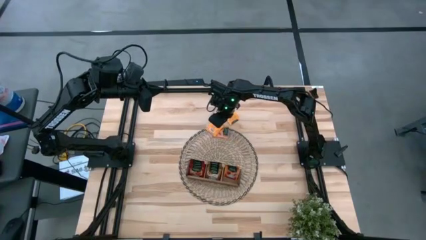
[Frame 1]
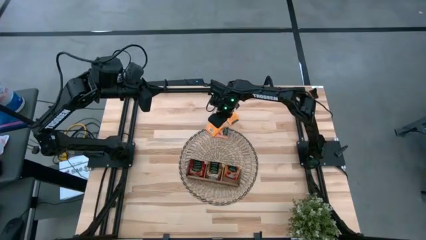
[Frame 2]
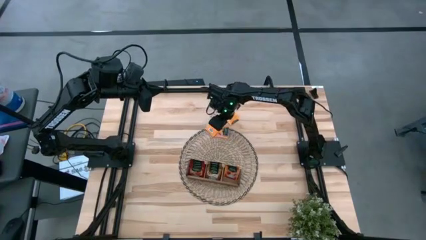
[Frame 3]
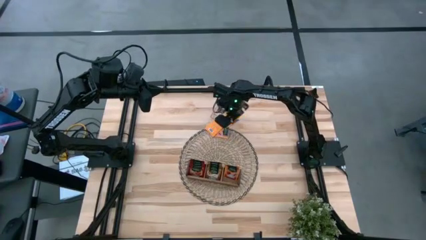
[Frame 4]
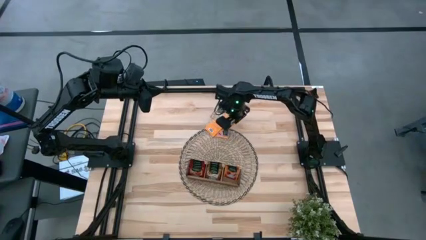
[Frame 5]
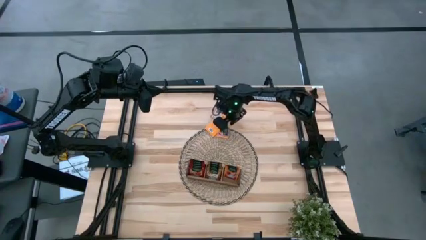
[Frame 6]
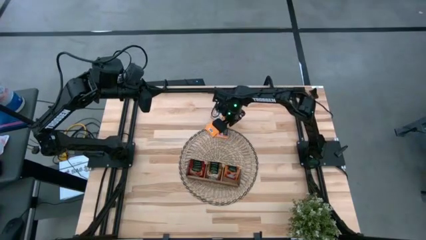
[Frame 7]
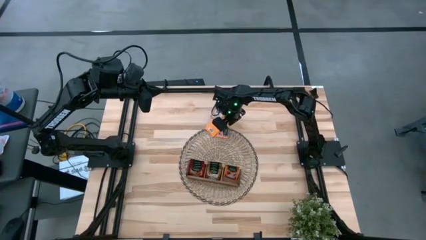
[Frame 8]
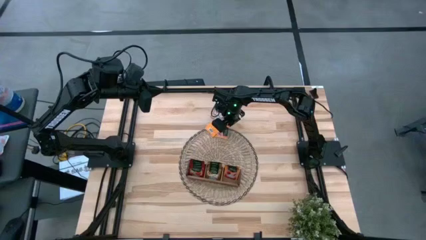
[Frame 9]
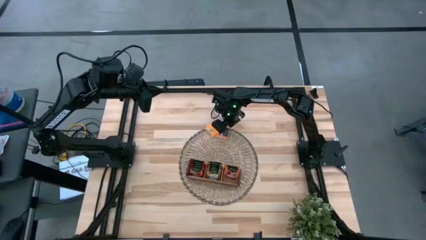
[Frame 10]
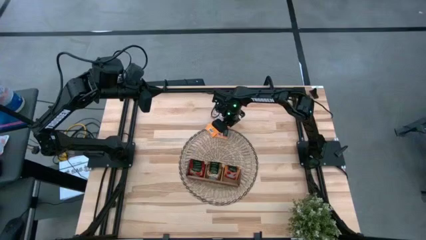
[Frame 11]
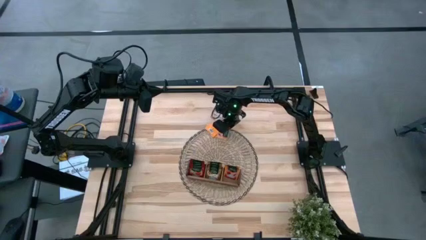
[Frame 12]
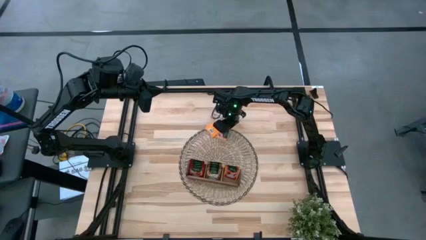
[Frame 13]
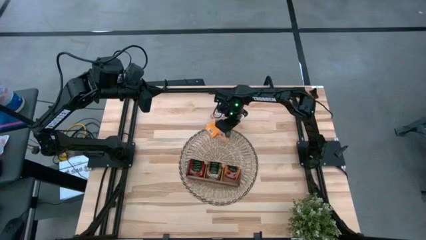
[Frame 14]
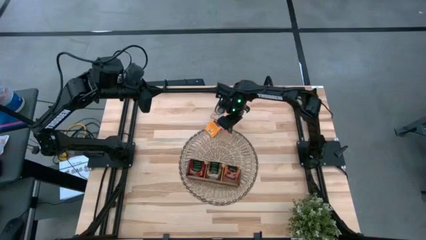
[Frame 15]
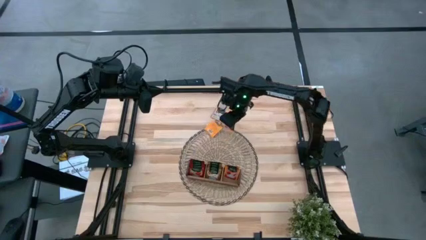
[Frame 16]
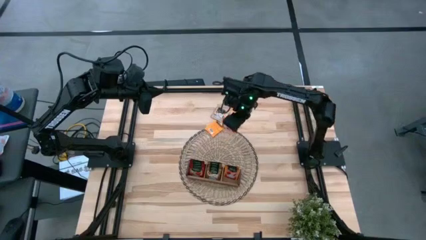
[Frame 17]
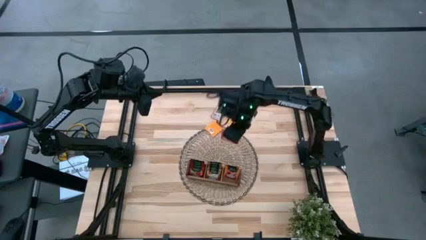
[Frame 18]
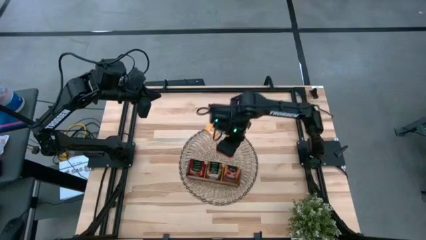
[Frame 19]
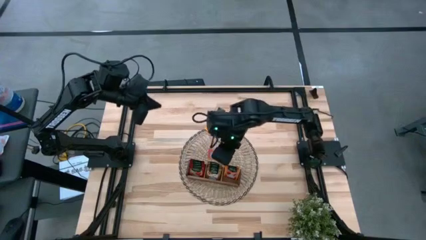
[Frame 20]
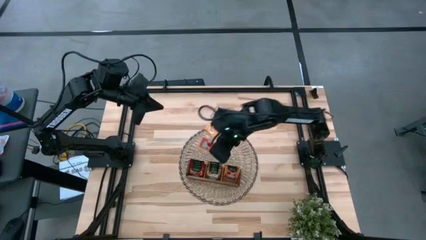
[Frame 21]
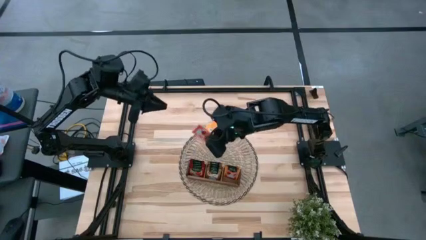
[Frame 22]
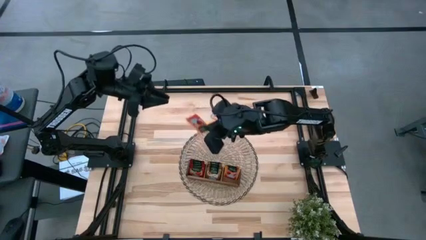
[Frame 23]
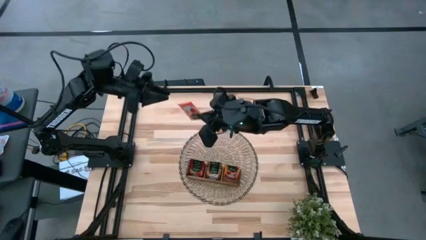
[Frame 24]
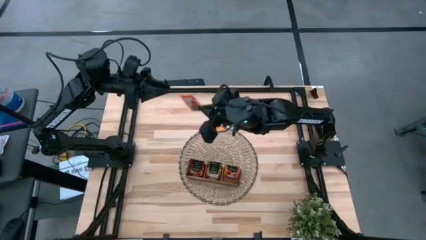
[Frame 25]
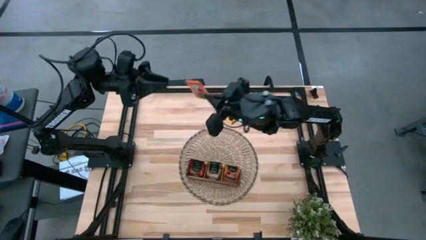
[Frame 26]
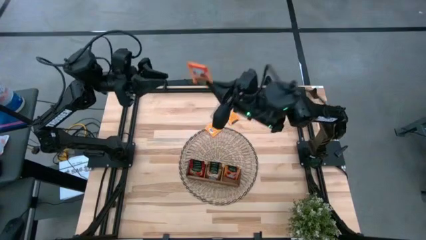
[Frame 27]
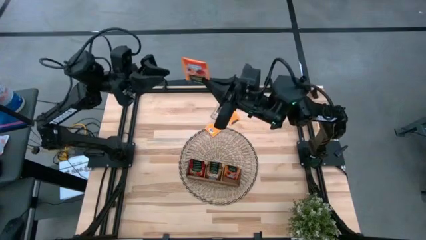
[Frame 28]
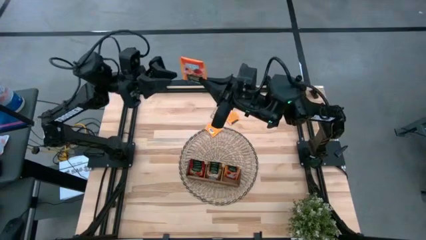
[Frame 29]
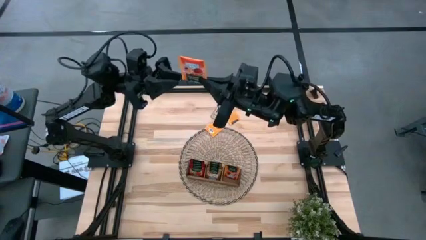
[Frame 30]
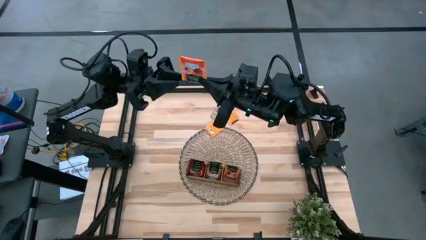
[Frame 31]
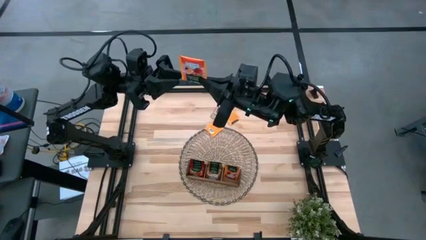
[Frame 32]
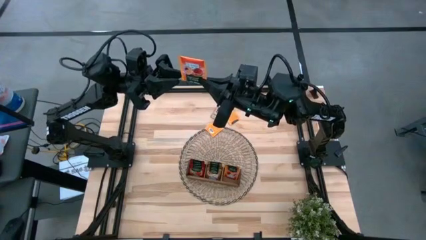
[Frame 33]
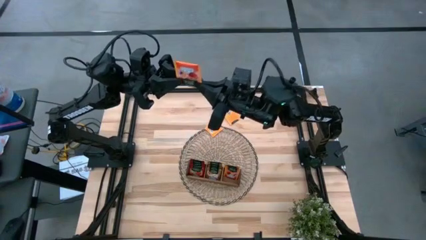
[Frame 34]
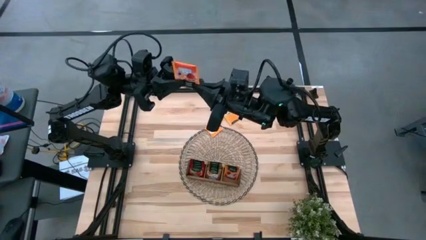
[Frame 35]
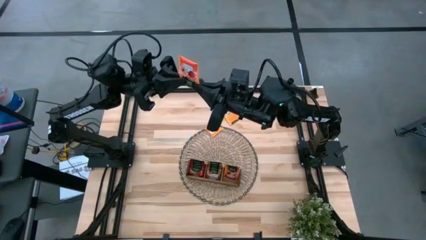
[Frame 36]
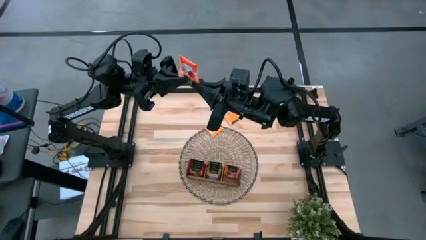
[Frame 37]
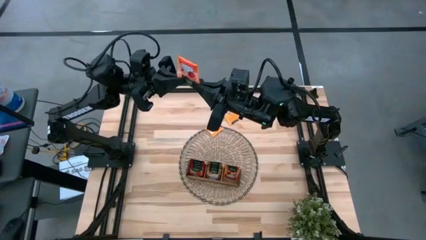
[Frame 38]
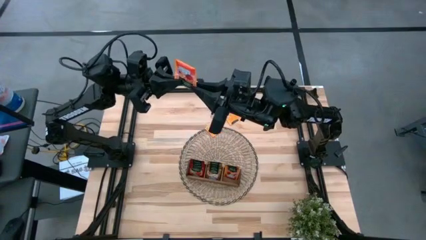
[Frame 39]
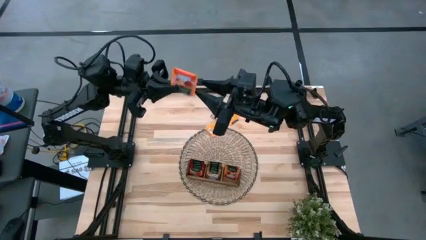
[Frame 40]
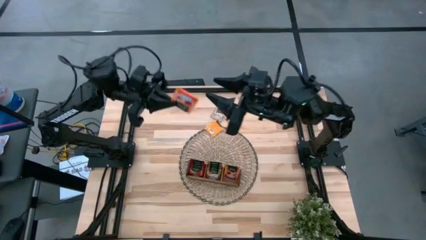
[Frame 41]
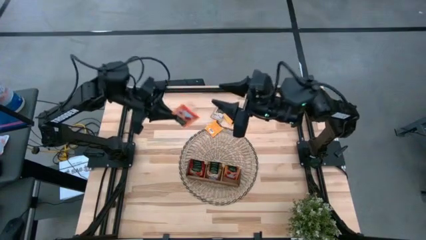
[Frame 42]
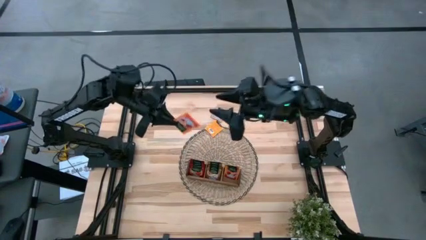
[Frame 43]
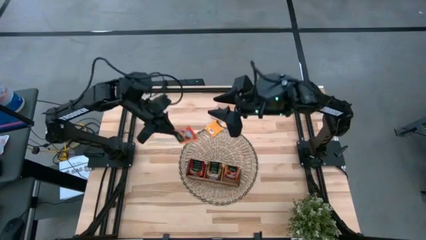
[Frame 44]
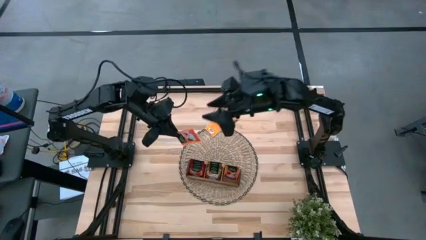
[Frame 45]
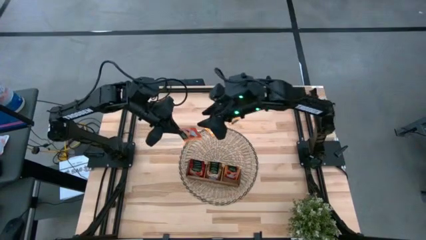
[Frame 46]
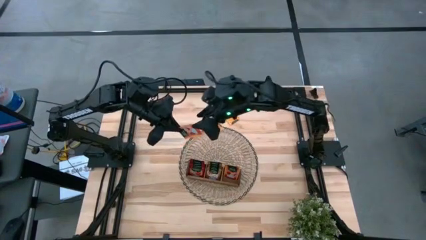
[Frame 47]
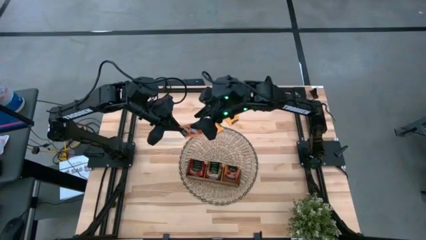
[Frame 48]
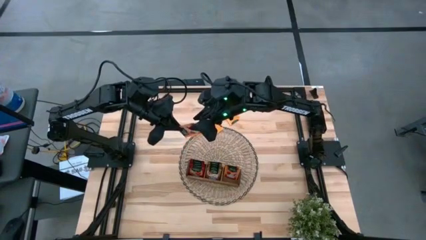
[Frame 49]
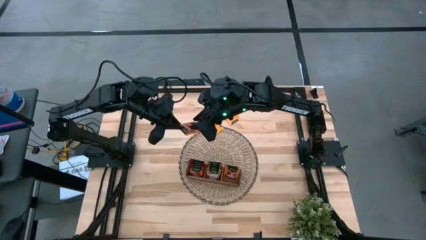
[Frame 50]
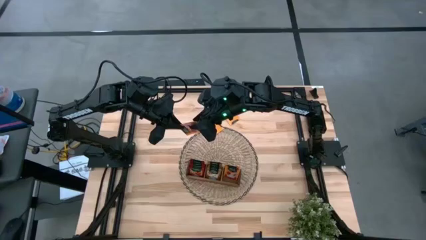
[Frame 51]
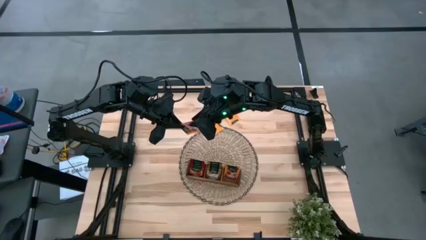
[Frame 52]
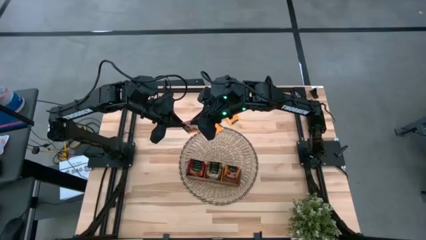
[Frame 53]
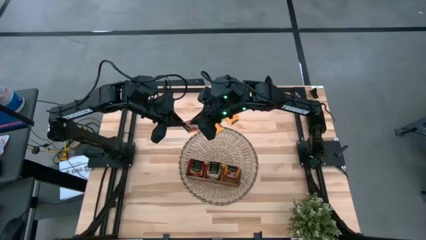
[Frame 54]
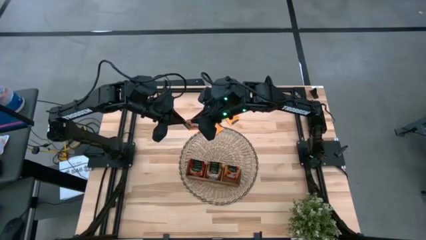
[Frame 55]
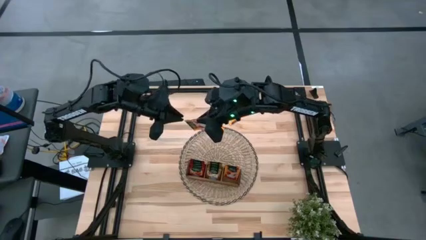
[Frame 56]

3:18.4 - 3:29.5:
Task: Pick & Place Tea
Put the orange tea bag into the right section of the wooden organizer

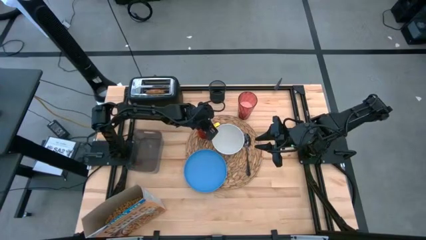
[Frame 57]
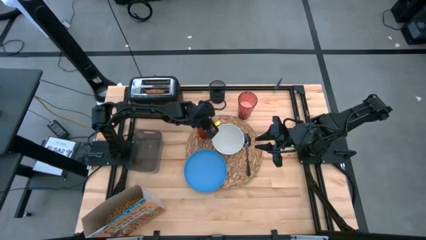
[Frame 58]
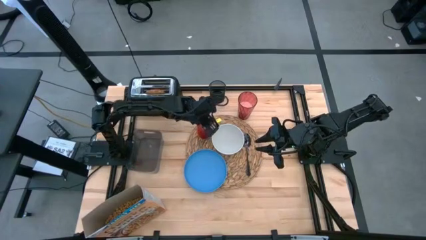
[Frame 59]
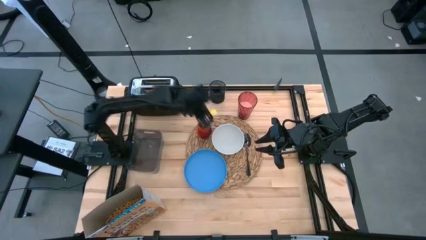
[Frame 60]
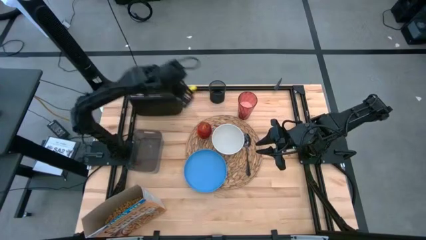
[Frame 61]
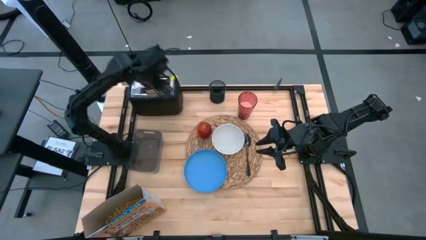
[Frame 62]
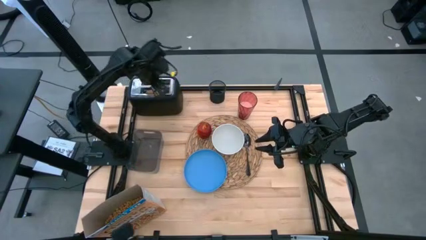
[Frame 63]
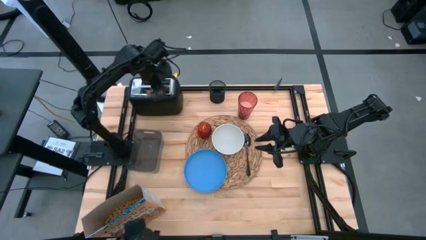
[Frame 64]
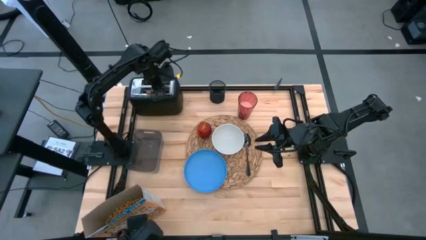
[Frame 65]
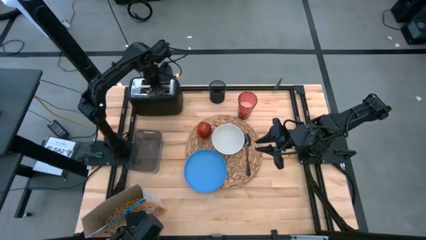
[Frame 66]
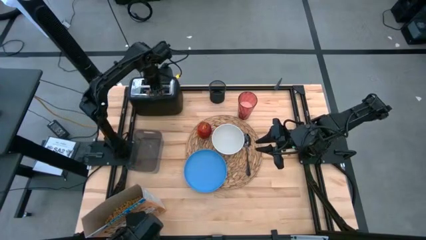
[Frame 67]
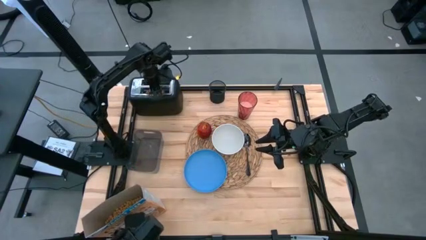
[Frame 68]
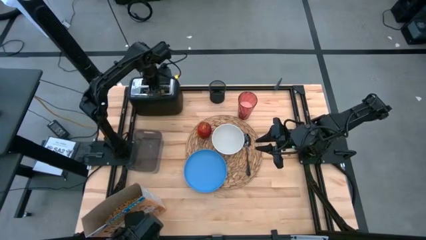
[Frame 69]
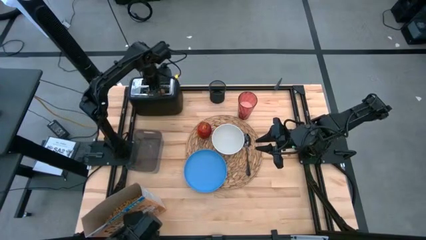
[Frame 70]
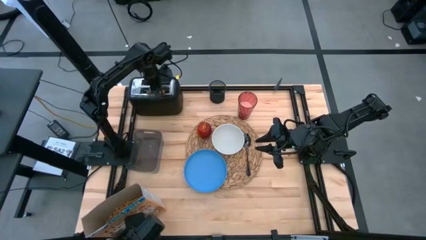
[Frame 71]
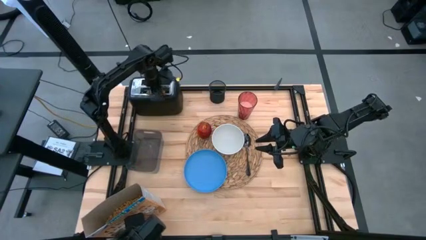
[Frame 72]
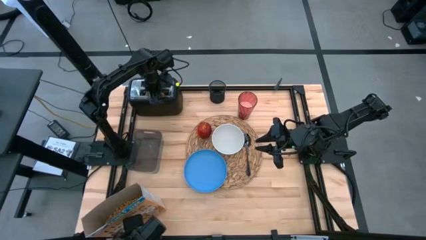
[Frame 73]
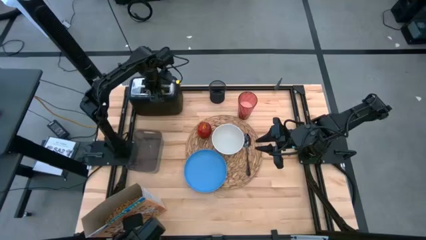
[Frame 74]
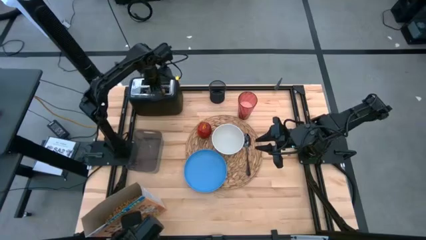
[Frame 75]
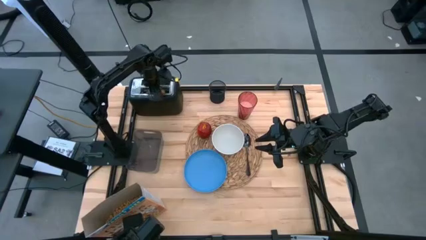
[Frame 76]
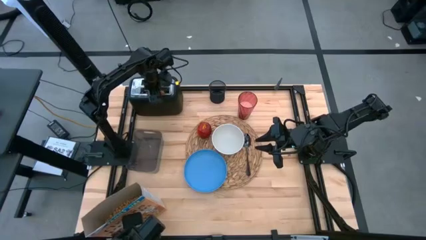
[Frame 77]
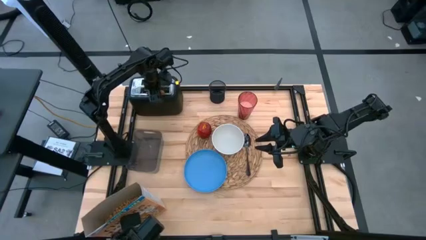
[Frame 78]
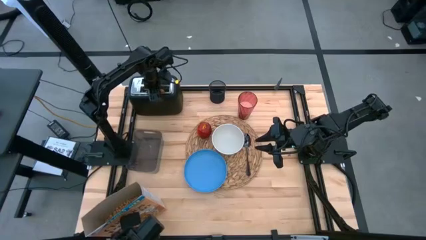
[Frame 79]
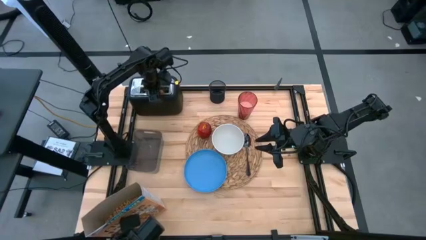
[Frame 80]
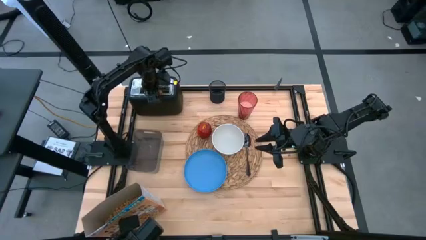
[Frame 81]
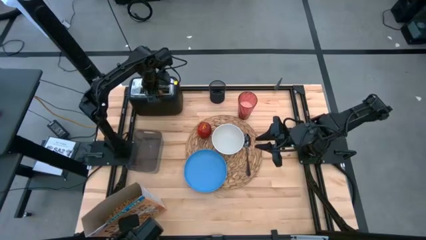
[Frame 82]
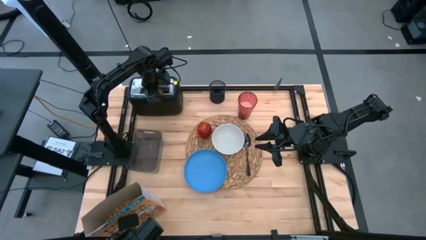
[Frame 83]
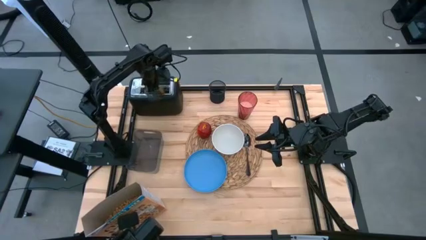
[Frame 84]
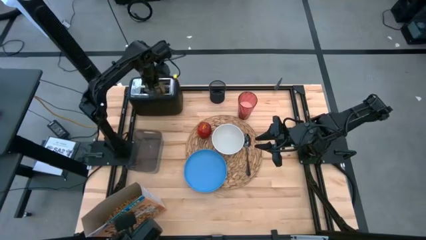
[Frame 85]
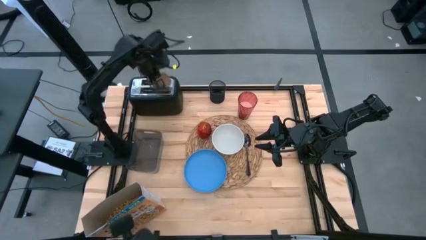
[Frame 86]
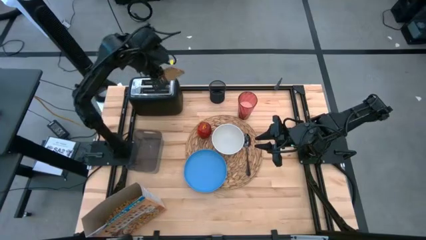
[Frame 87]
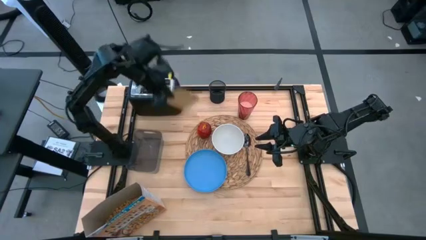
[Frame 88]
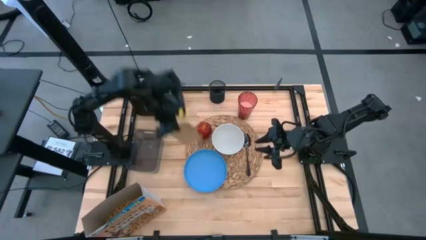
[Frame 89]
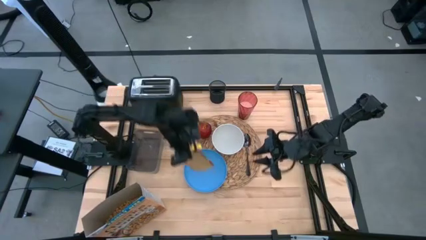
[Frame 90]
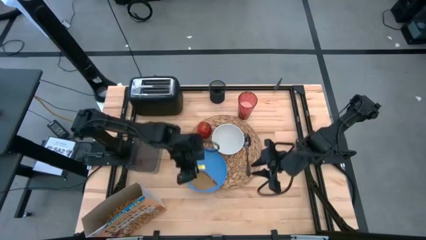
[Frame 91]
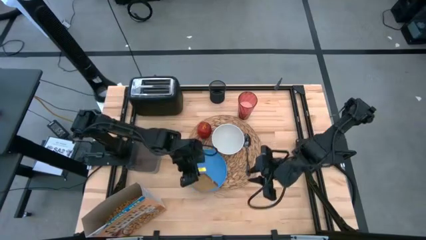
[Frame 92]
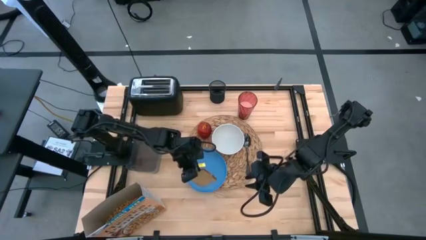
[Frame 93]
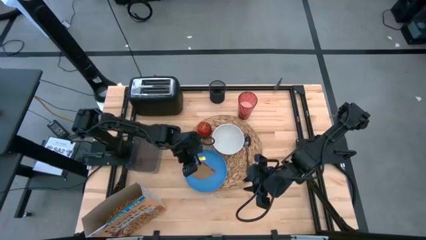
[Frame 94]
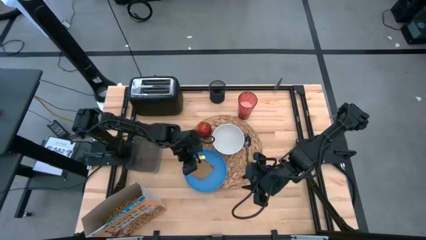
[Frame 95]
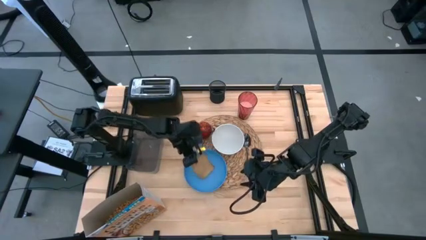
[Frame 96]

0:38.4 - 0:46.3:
Task: Arrange a breakfast setting
Put the toasted bread from the toaster oven on the blue plate
